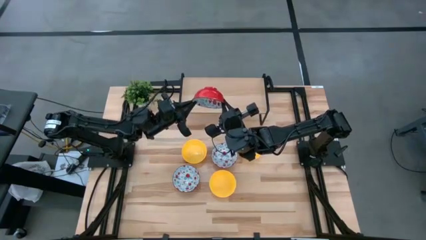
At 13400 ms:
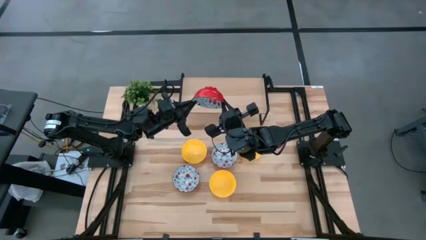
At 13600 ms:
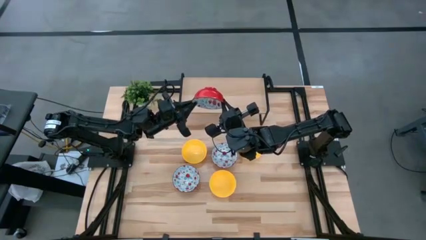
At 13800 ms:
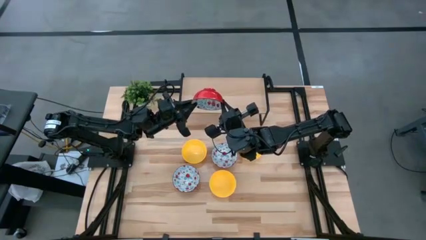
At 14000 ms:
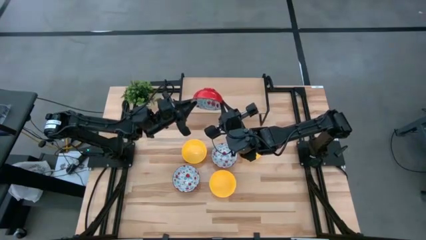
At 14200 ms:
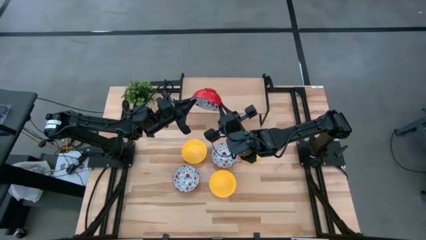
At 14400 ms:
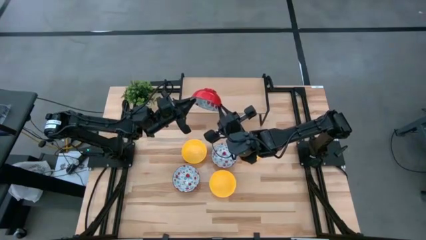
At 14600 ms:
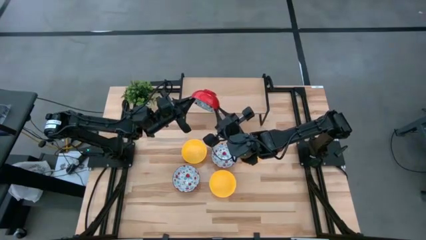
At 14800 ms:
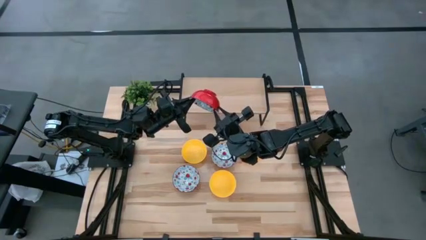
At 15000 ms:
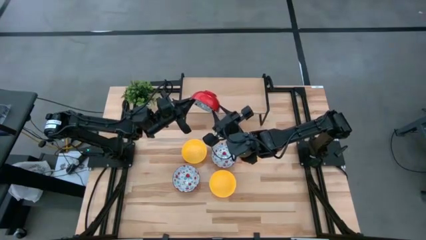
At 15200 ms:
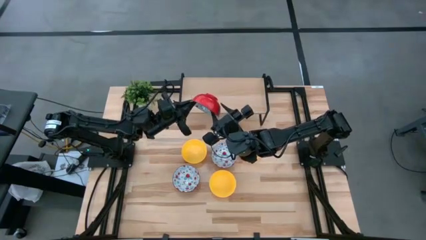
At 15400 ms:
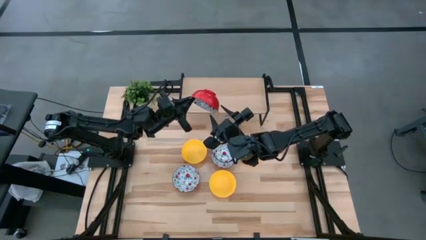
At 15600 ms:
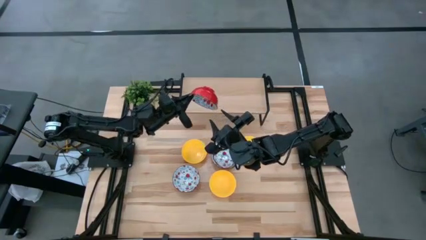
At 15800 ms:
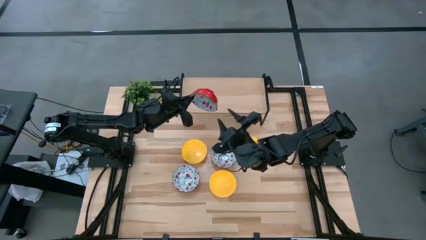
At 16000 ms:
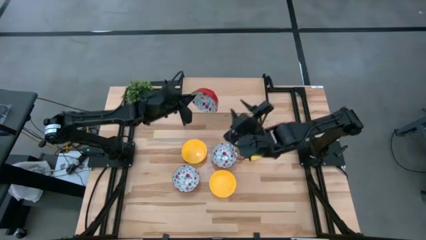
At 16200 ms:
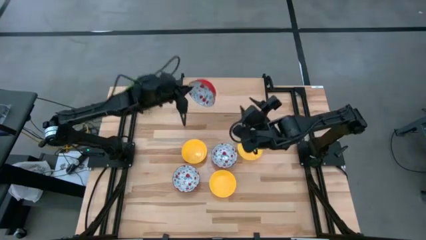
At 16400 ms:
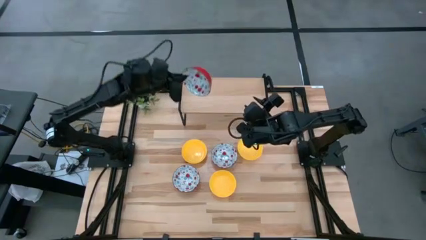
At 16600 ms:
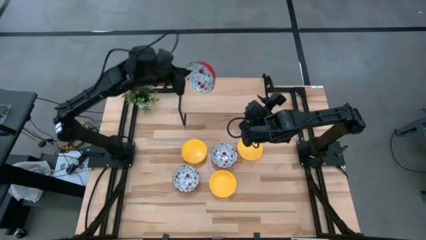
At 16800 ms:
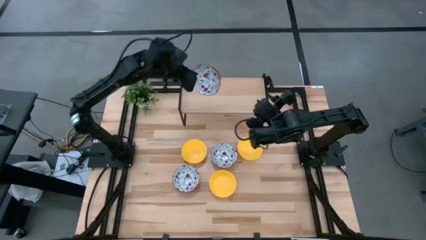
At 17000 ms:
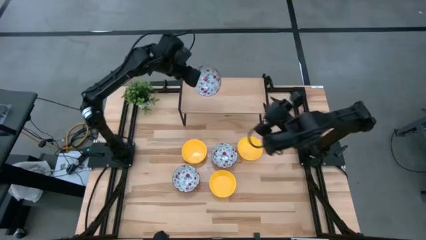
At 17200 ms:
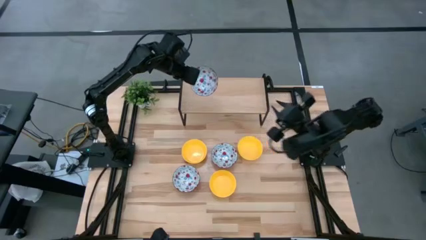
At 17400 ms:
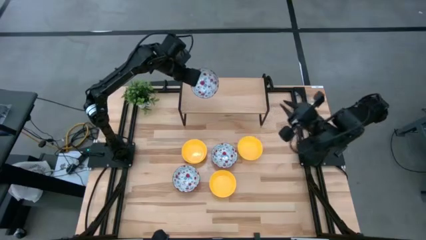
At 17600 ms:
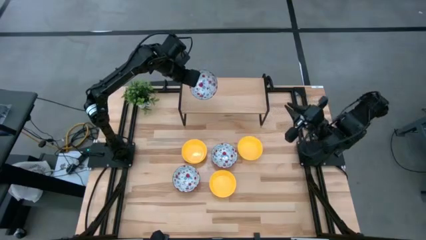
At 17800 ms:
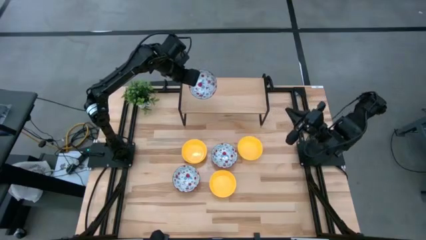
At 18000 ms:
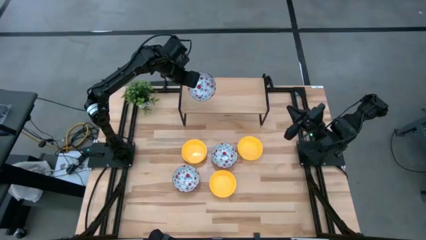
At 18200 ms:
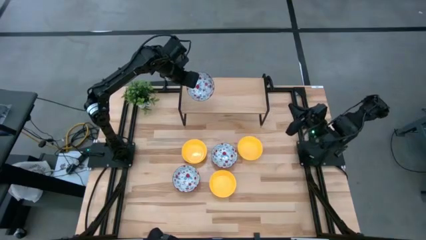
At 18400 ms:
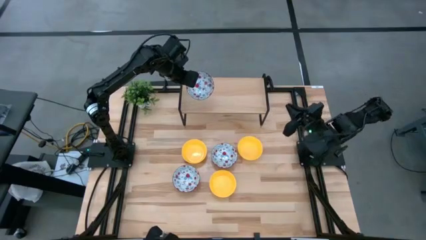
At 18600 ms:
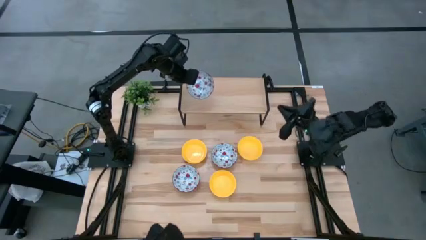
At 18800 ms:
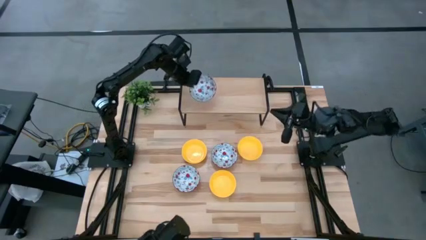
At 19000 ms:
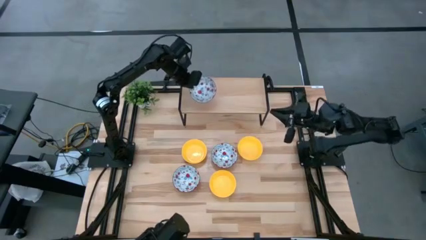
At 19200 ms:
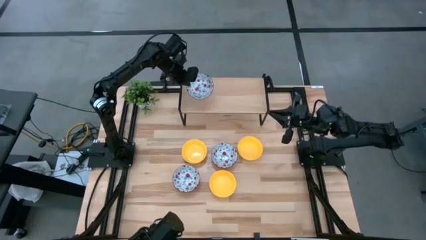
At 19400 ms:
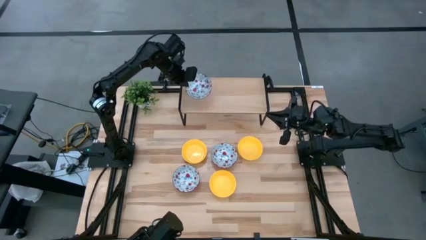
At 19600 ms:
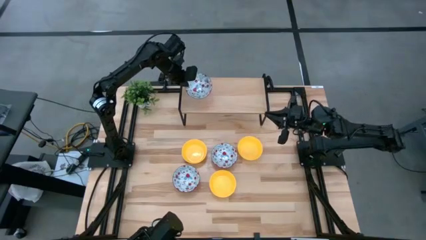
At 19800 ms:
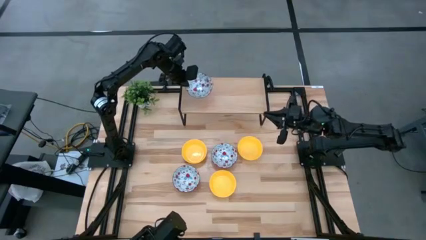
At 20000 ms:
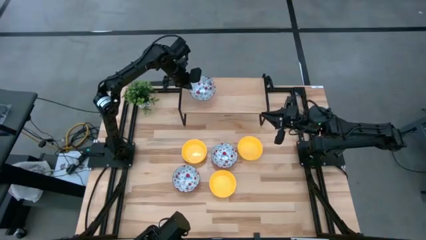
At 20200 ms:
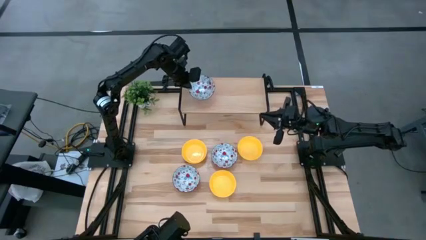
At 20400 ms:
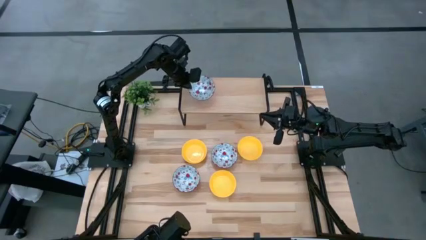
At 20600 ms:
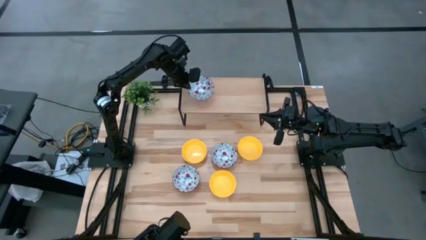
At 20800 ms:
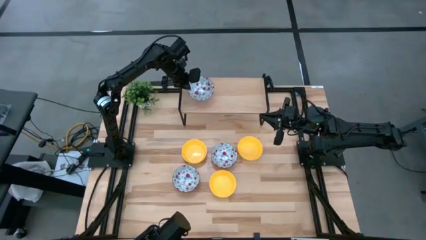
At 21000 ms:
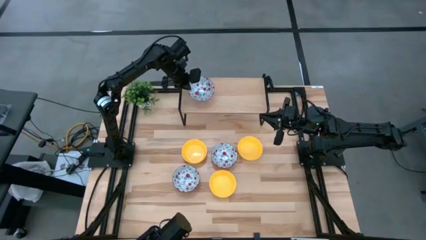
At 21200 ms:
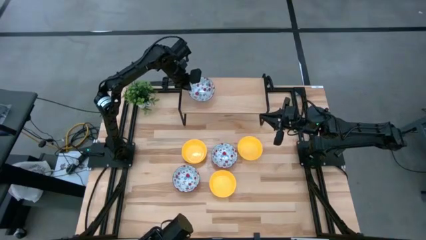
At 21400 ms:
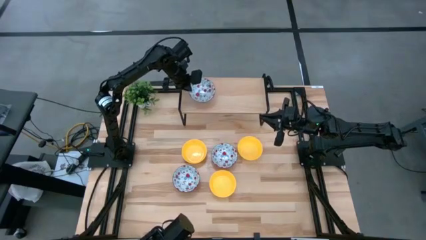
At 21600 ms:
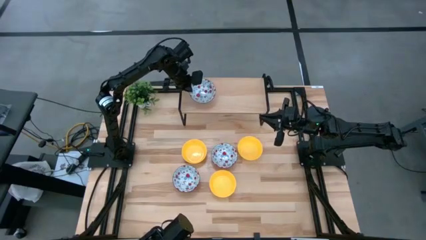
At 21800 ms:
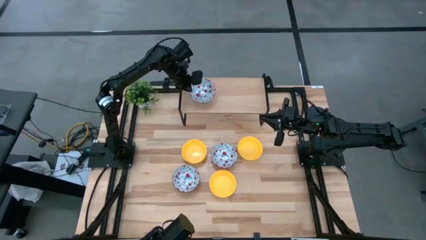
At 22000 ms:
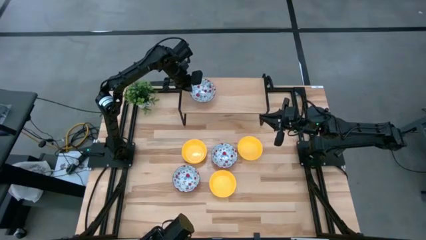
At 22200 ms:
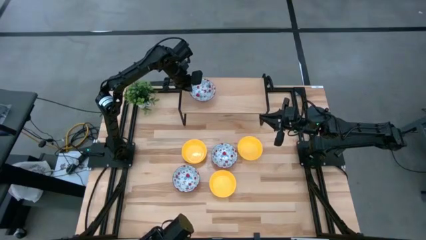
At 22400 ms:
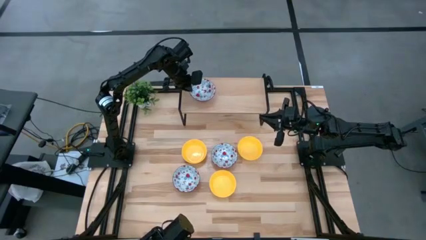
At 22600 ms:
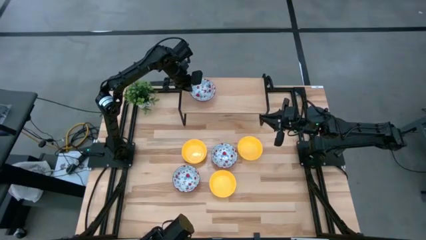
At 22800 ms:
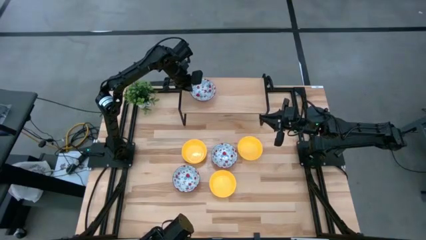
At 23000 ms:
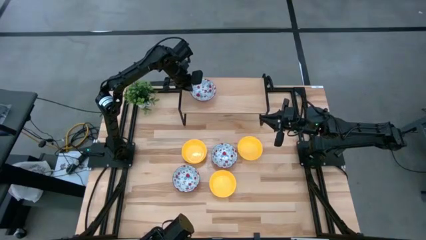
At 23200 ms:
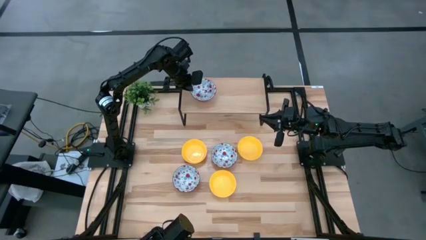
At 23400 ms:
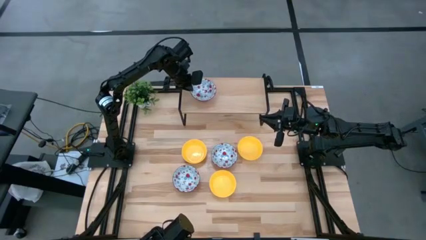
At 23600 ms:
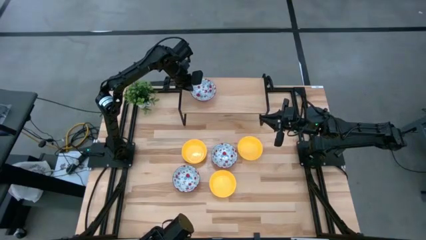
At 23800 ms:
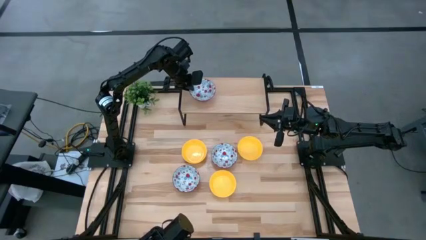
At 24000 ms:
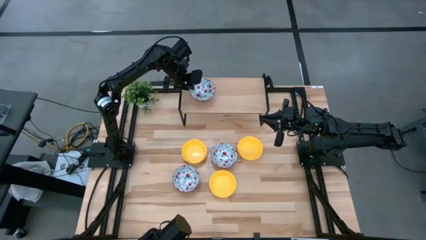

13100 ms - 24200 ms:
Task: Pick & Place Mini bowls
Put the right white bowl on the shelf
